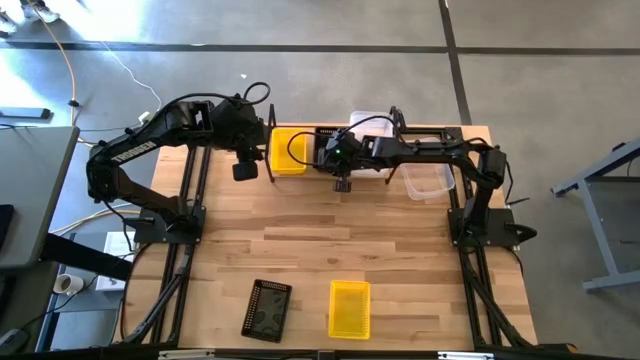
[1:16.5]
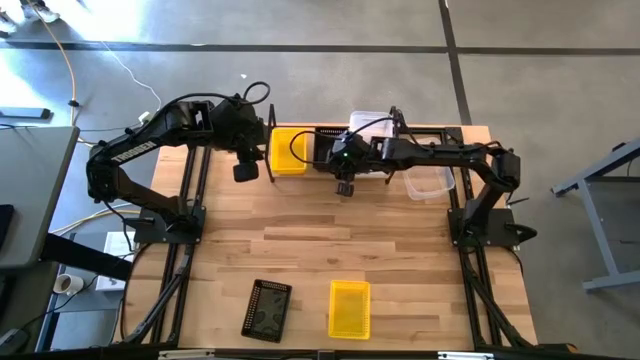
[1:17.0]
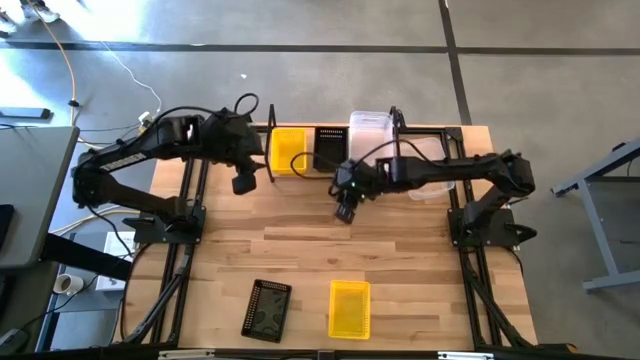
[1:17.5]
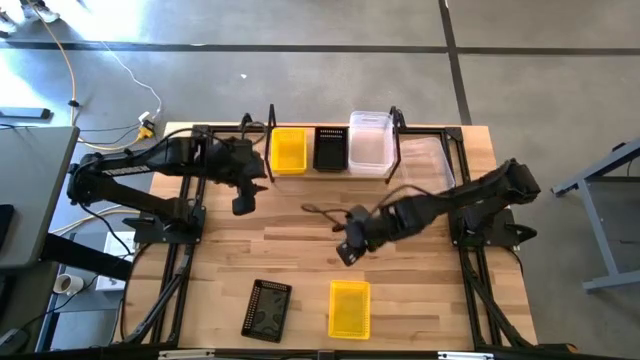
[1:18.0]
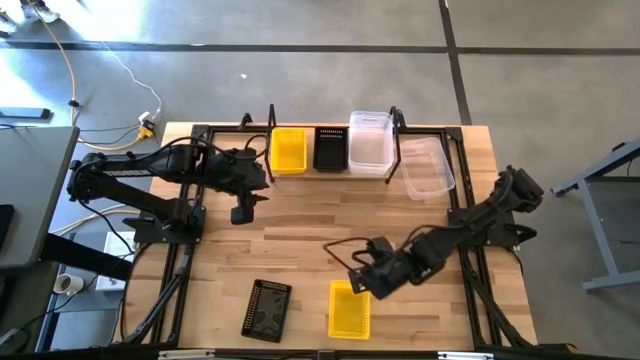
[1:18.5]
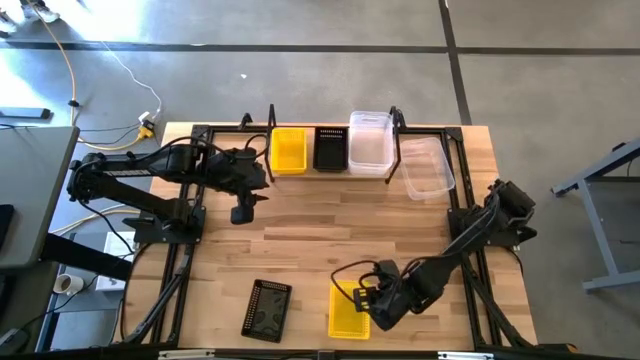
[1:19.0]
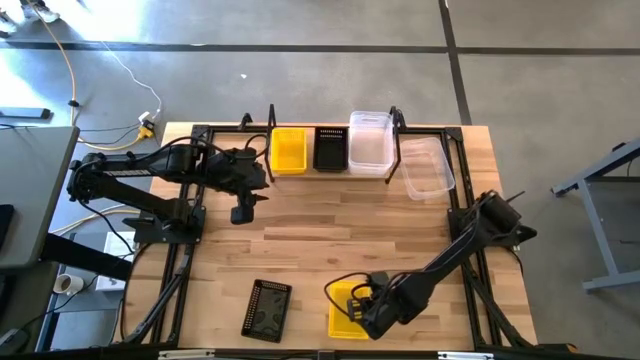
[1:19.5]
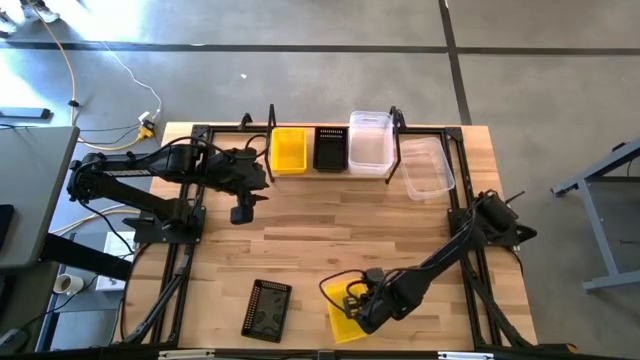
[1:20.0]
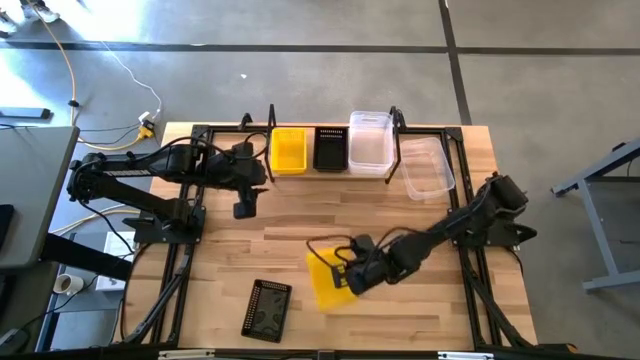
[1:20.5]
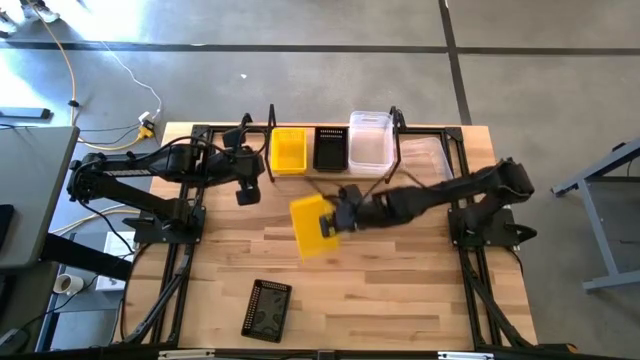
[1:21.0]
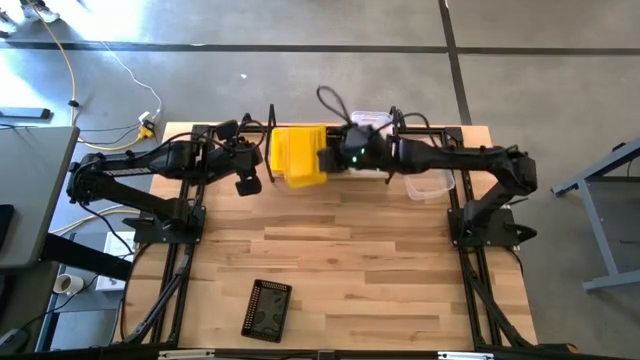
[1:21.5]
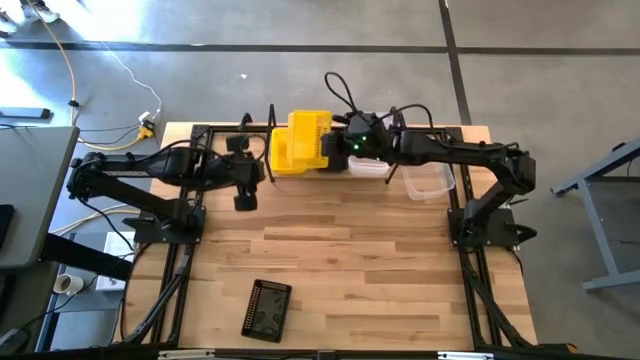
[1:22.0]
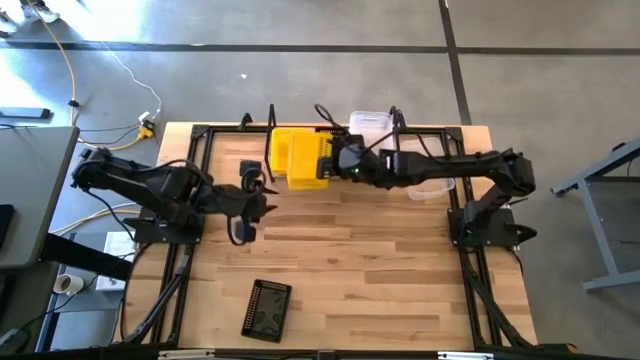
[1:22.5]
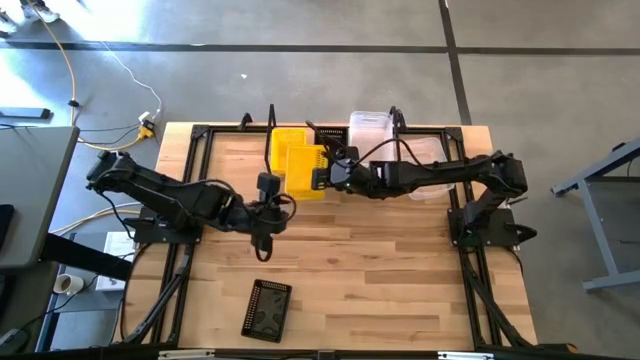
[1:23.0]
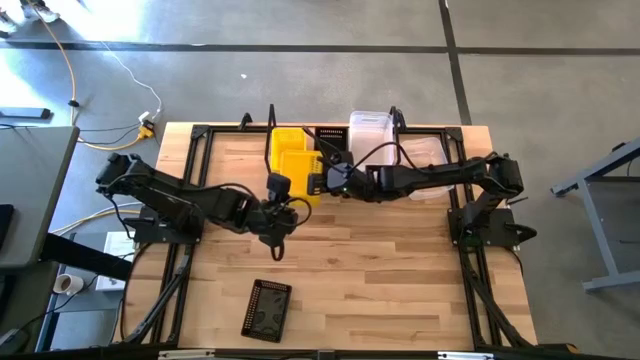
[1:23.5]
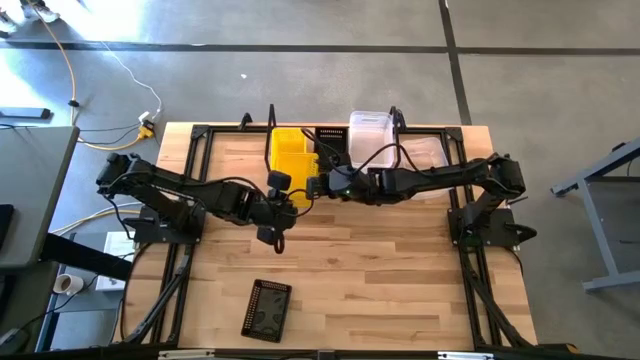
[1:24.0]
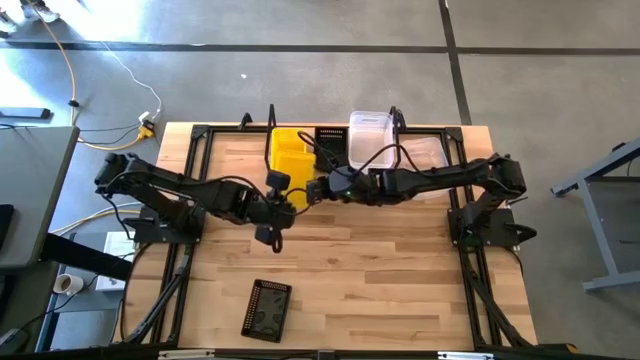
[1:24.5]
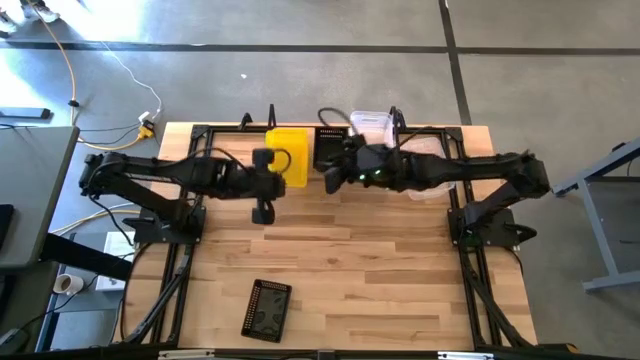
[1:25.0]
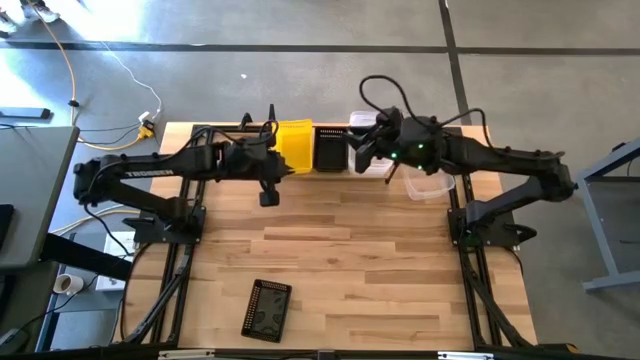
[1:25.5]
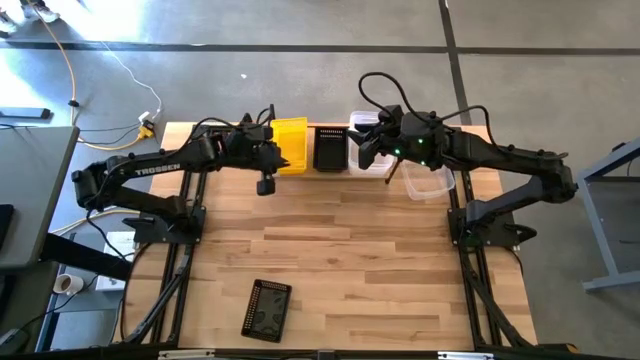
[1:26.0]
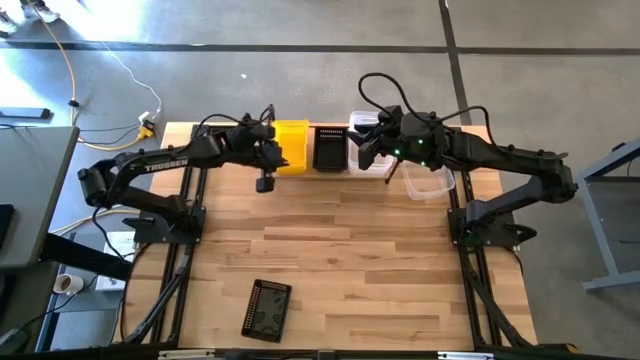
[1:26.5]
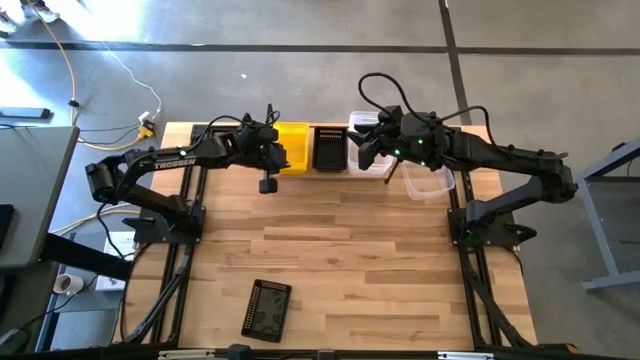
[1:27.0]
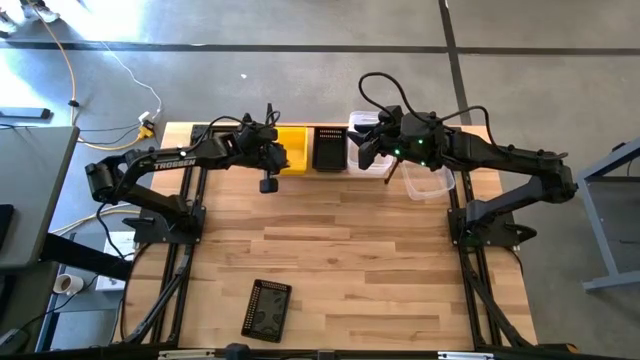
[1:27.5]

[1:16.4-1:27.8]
Task: Stack baskets on shelf by color
Stack the yellow bin on top of the yellow bin on the shelf

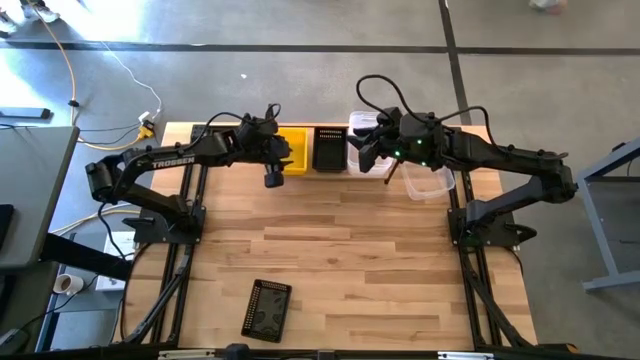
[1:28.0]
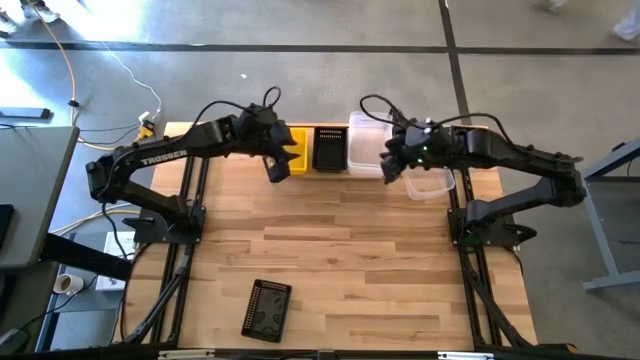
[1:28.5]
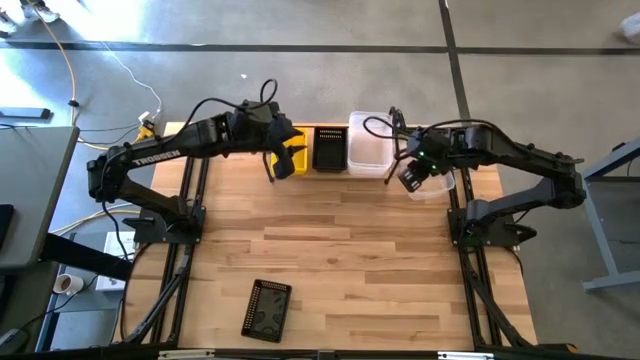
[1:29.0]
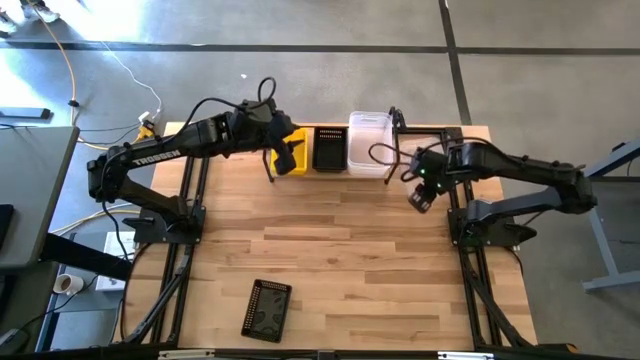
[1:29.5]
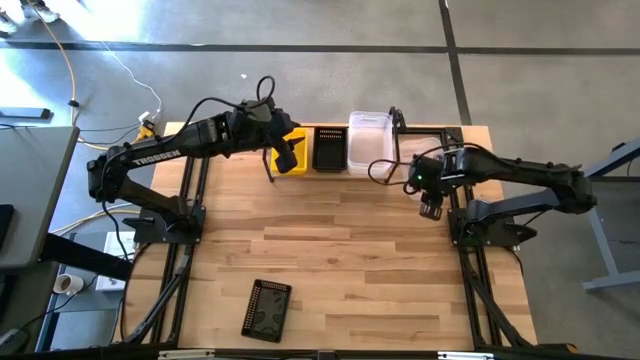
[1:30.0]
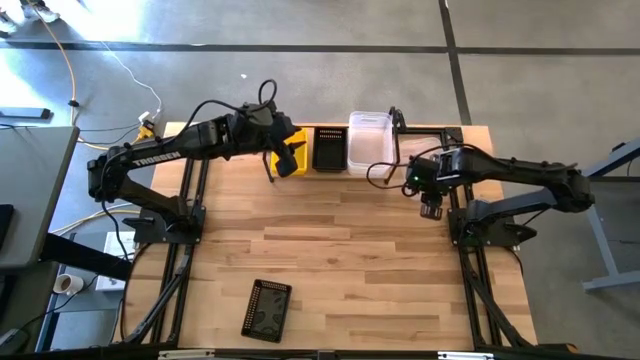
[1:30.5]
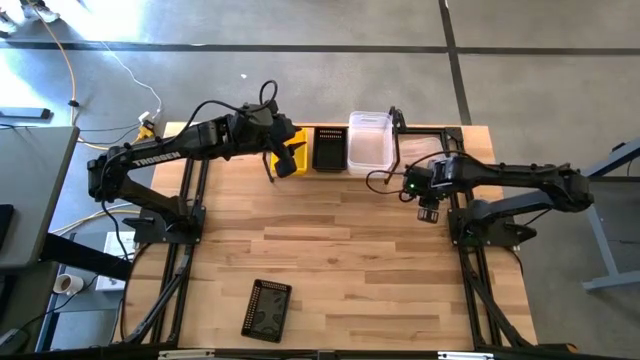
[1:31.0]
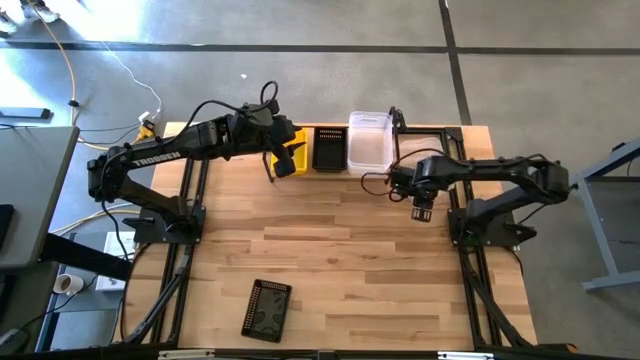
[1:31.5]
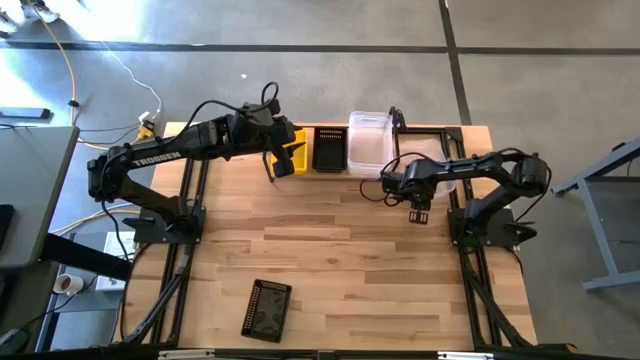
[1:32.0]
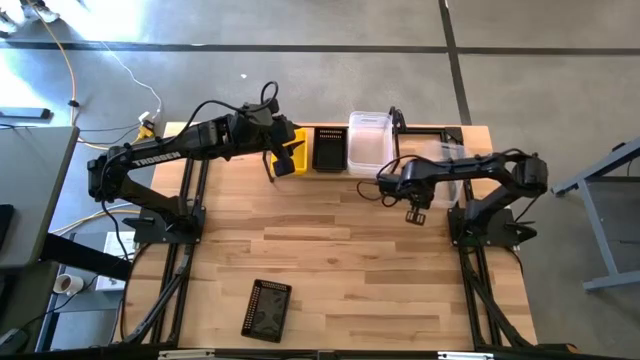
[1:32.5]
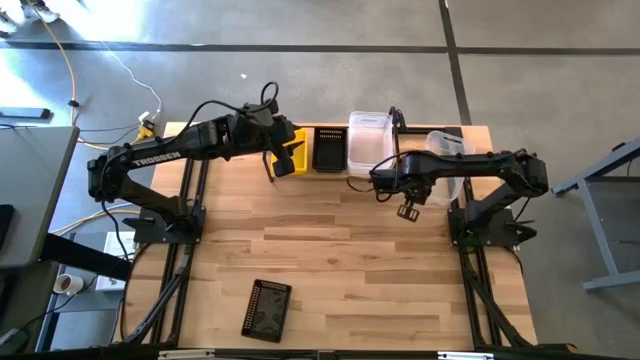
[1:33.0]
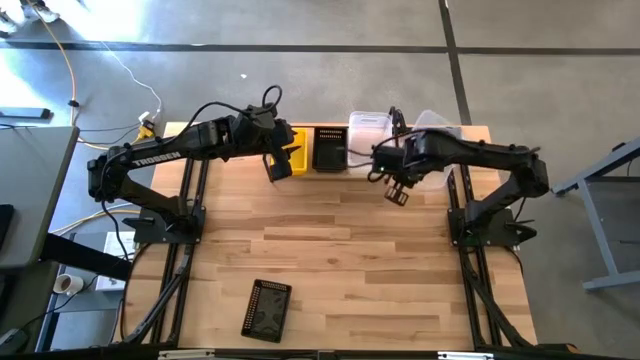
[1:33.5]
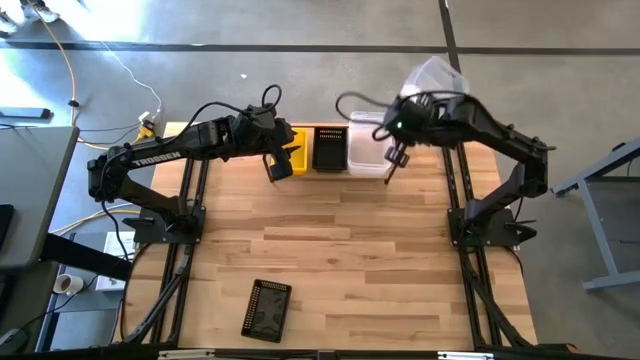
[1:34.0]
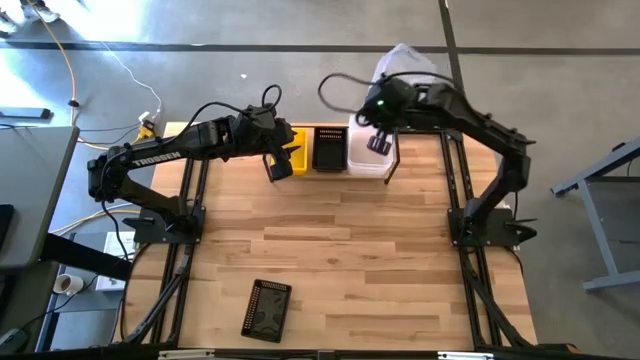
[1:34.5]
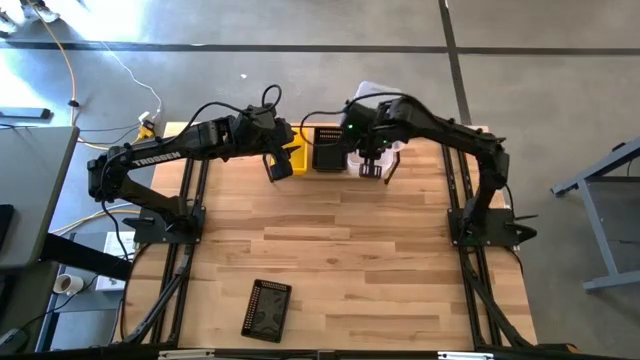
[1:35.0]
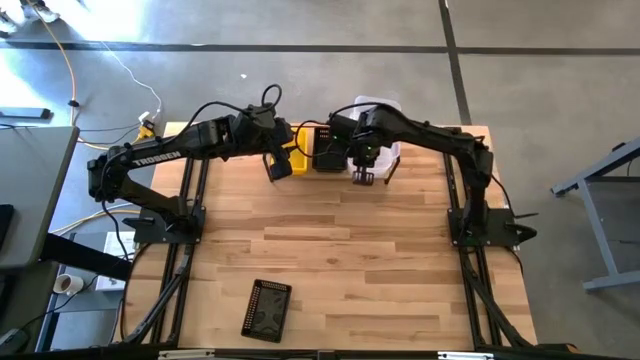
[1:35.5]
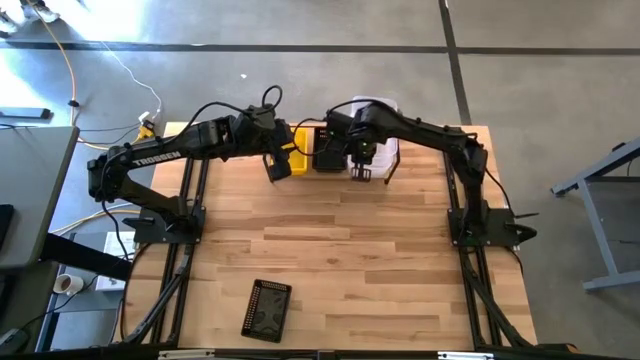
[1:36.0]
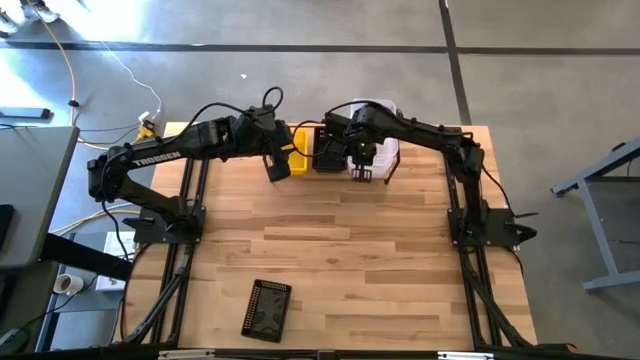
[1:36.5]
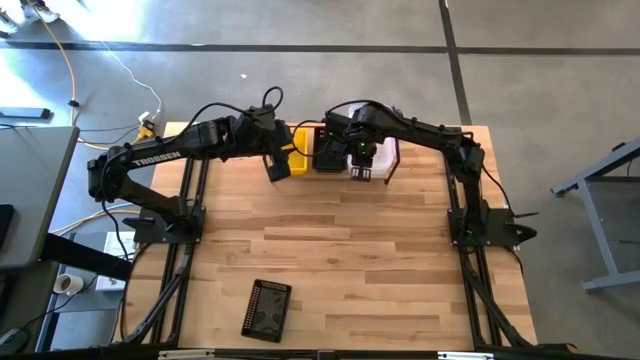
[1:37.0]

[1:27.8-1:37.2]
Stack the transparent bin on top of the transparent bin on the shelf
